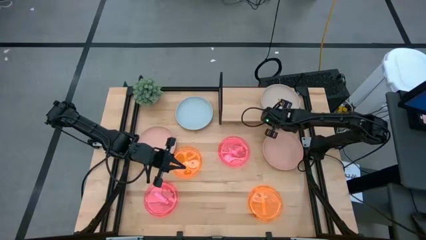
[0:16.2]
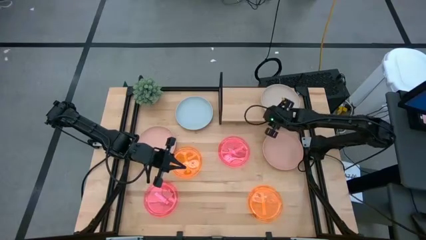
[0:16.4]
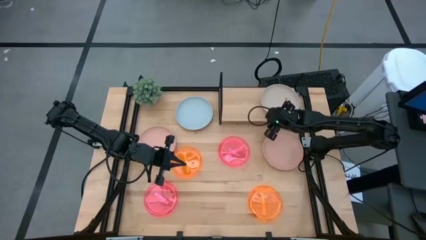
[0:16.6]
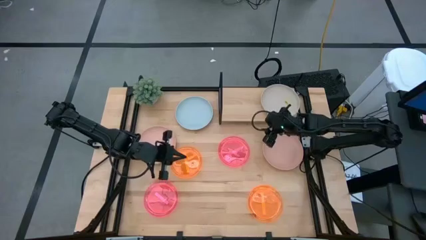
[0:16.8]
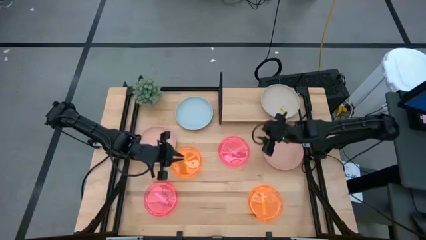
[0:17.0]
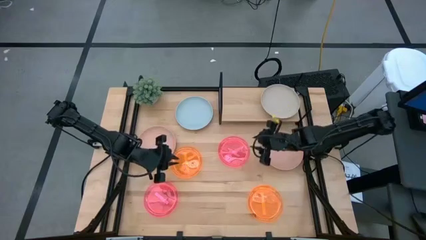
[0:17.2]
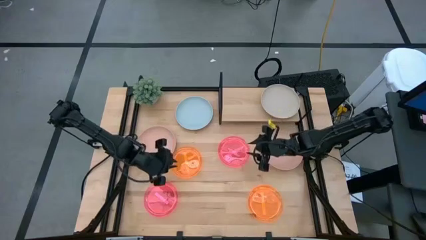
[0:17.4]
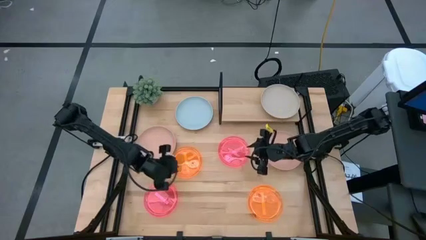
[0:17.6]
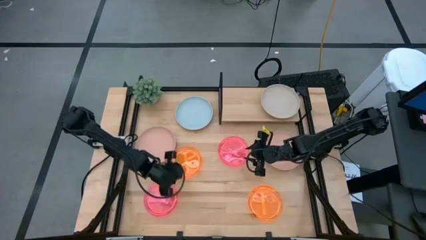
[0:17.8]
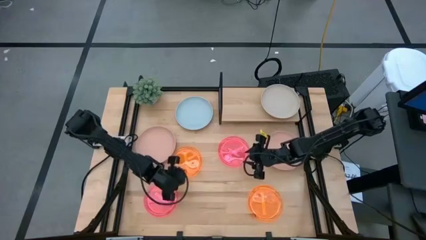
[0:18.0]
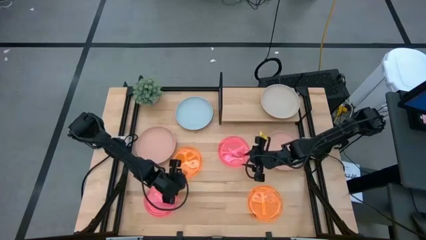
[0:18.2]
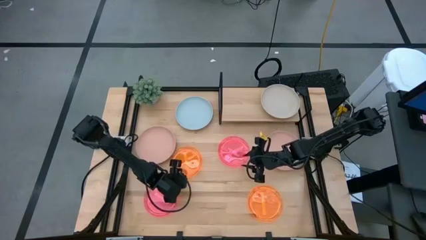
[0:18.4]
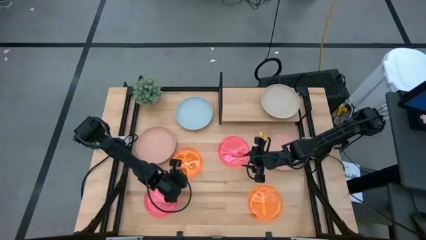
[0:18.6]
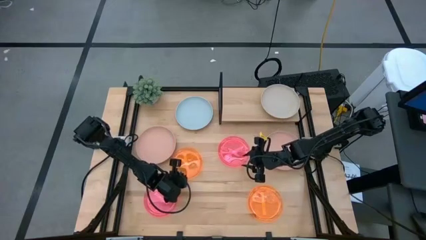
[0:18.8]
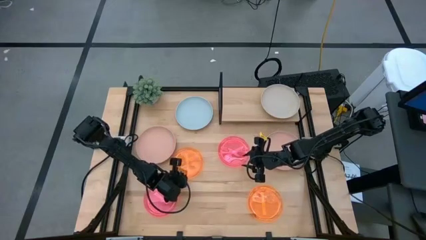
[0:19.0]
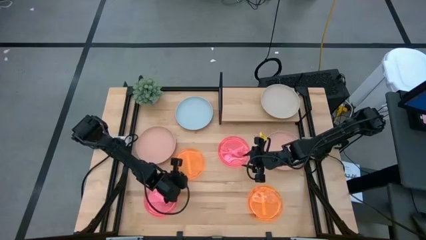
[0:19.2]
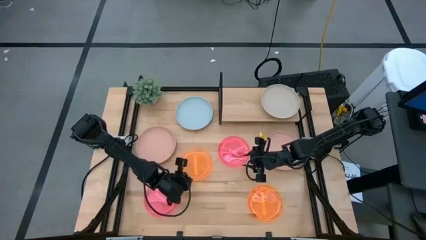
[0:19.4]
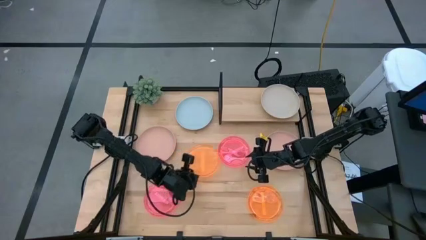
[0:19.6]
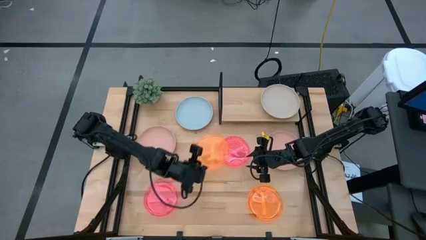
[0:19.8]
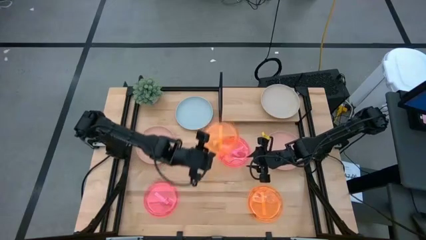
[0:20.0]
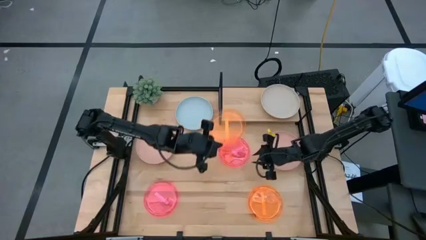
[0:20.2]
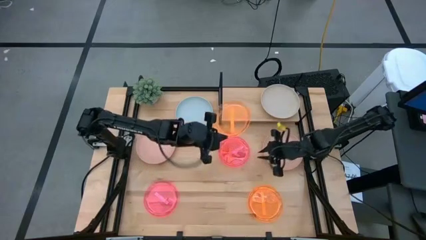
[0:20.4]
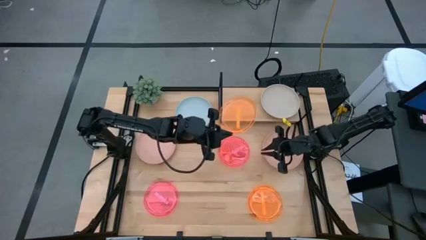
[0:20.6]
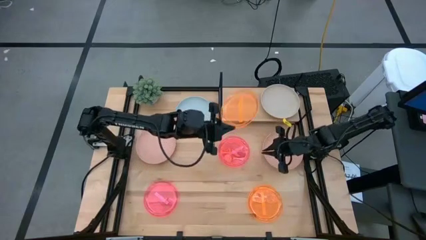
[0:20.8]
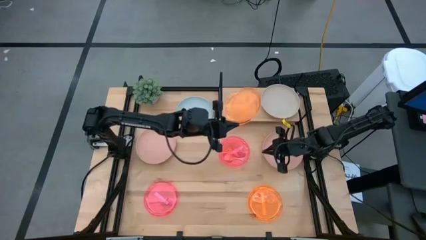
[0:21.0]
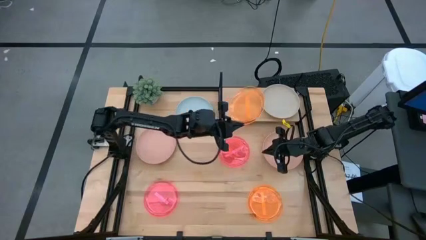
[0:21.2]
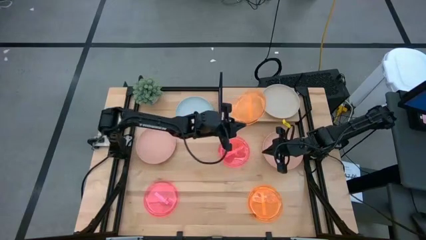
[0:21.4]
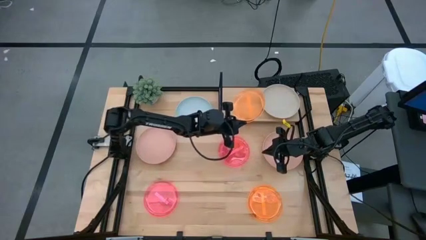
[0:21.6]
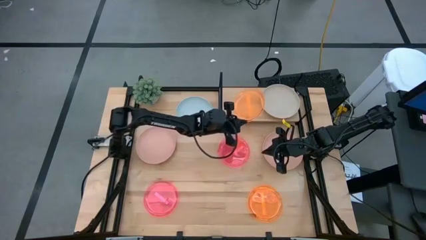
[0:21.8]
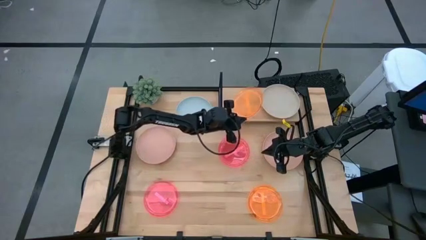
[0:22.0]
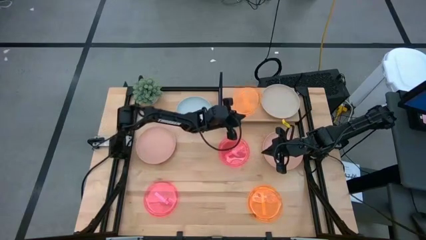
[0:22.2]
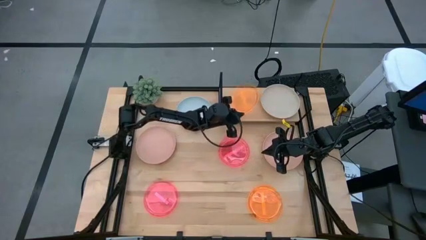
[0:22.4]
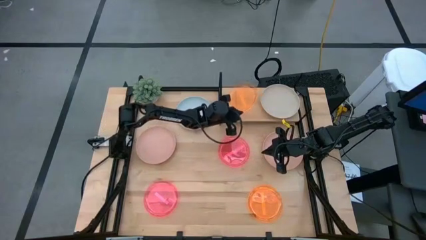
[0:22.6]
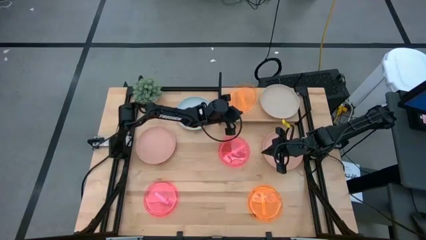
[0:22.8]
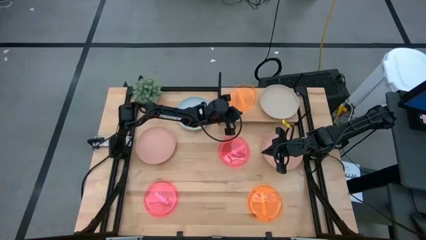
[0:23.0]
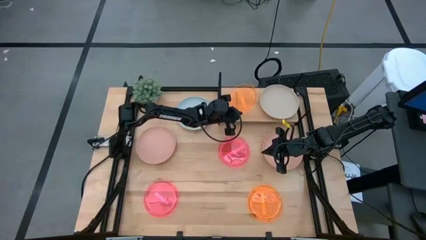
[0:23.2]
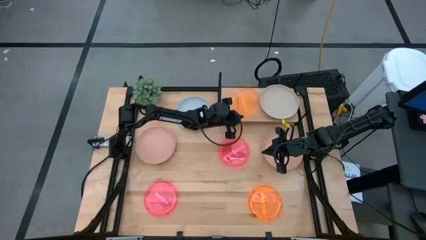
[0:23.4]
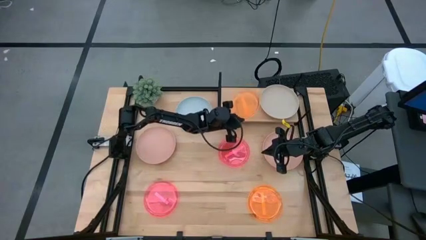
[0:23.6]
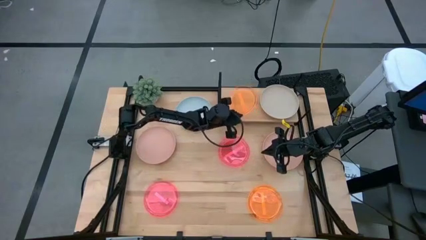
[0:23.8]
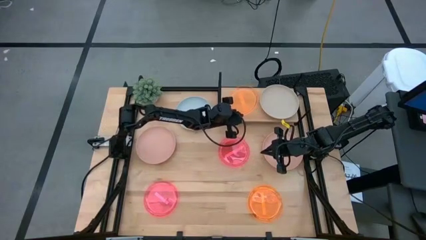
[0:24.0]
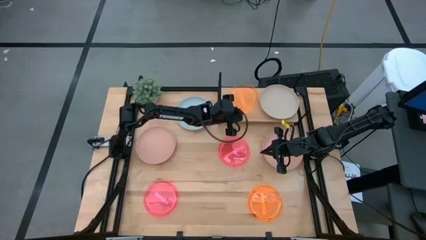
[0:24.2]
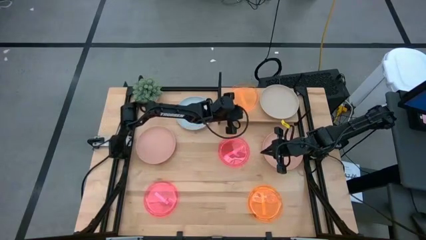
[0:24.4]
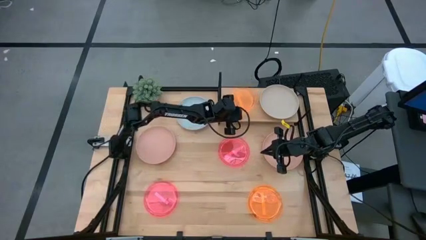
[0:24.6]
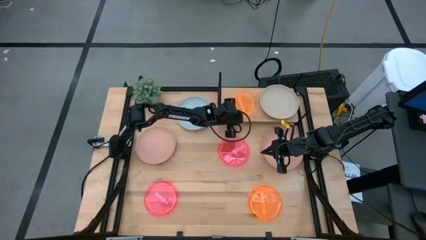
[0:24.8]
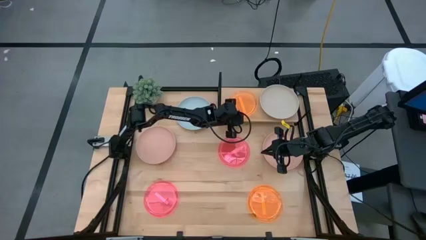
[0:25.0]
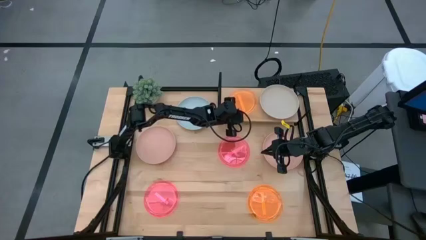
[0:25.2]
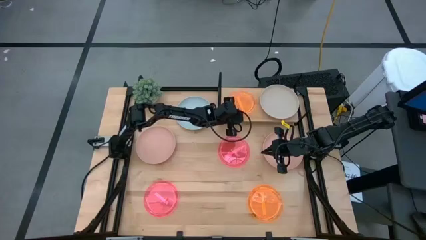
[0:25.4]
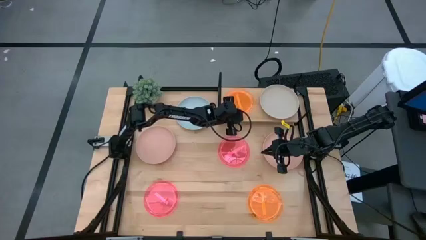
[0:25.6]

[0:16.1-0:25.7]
Task: Place and stack plates onto a shelf
Put the top orange plate on the shelf

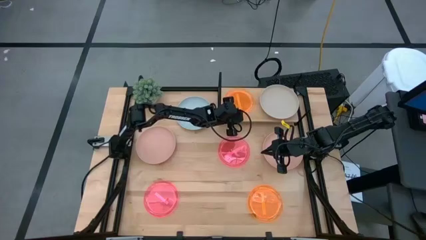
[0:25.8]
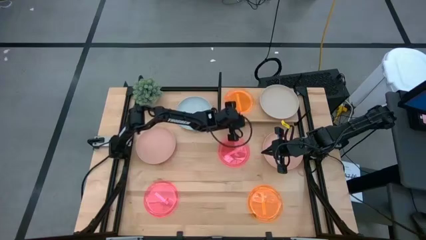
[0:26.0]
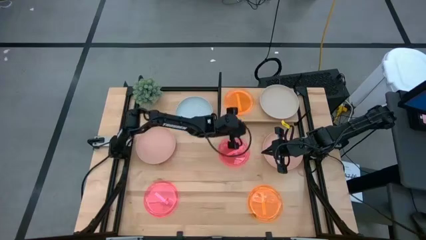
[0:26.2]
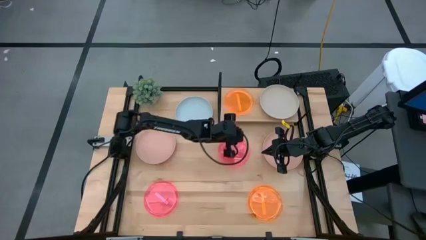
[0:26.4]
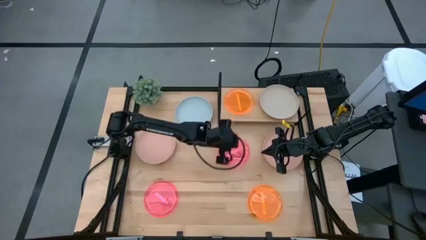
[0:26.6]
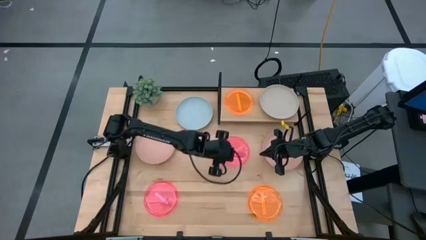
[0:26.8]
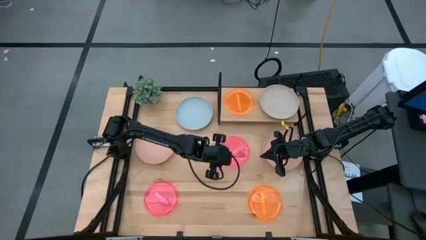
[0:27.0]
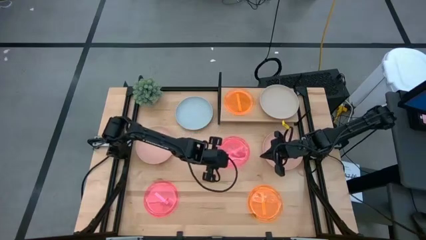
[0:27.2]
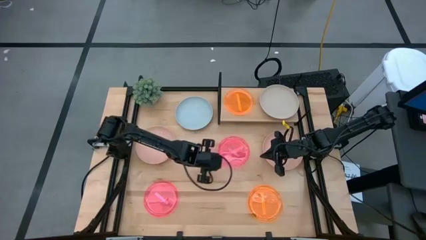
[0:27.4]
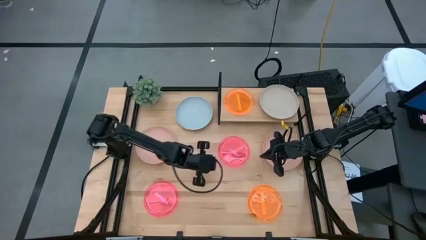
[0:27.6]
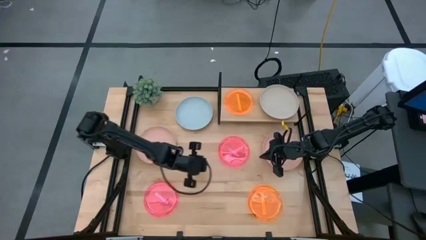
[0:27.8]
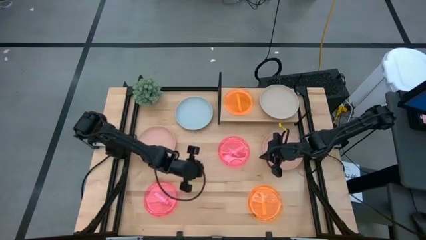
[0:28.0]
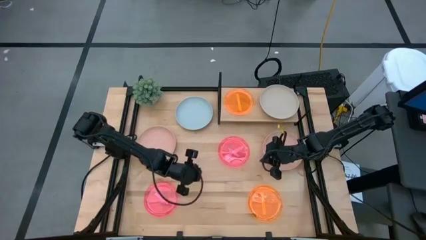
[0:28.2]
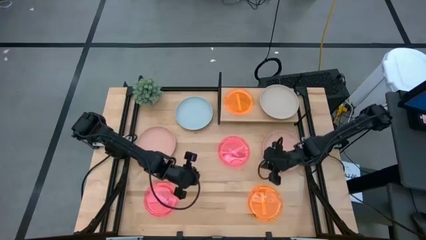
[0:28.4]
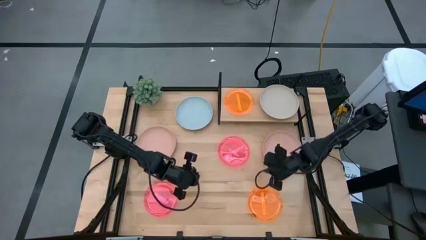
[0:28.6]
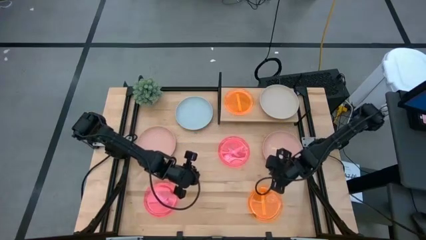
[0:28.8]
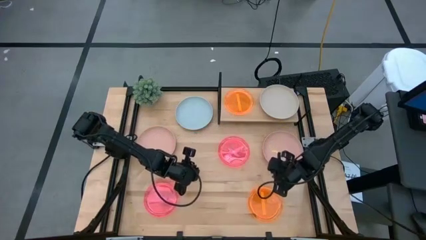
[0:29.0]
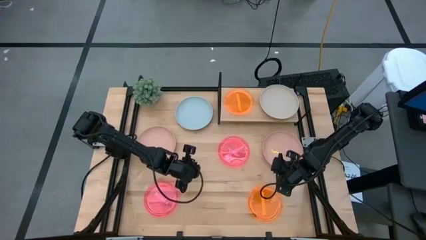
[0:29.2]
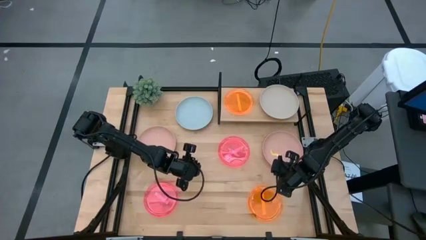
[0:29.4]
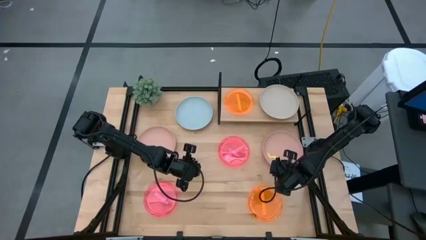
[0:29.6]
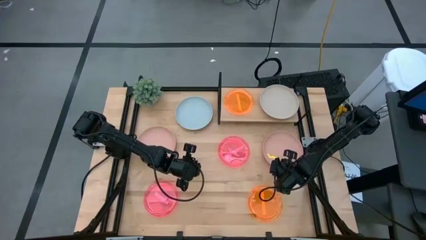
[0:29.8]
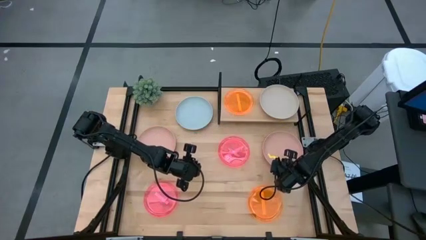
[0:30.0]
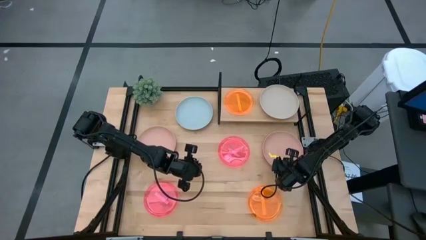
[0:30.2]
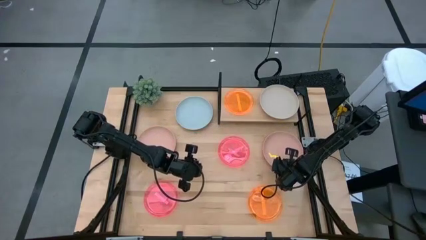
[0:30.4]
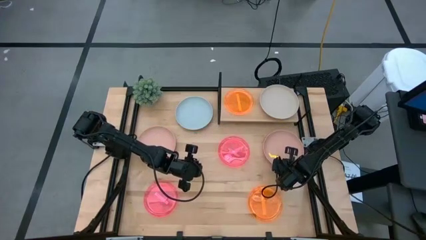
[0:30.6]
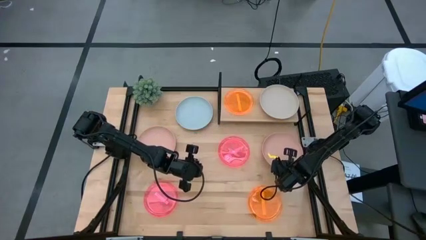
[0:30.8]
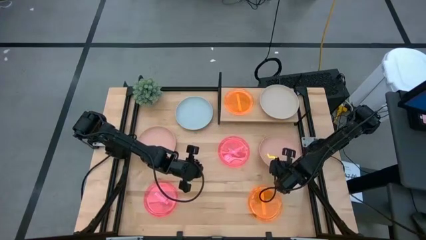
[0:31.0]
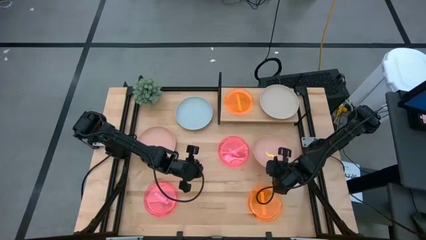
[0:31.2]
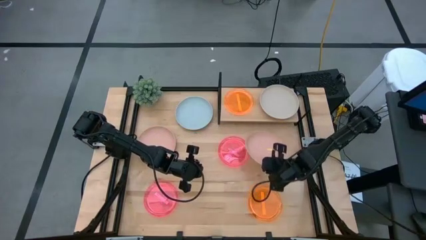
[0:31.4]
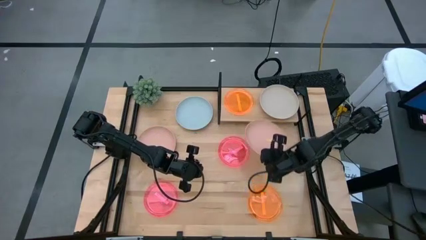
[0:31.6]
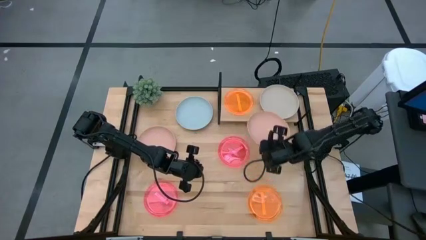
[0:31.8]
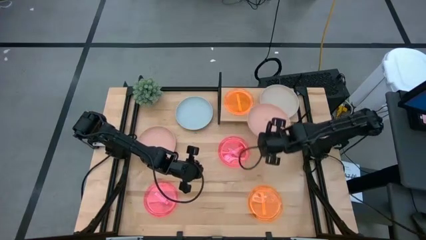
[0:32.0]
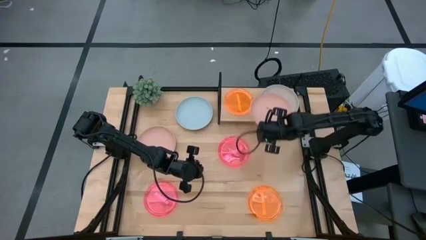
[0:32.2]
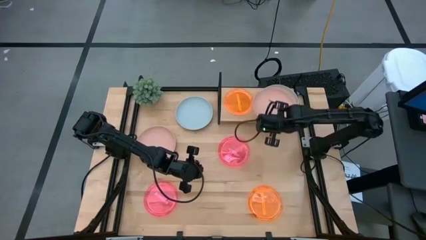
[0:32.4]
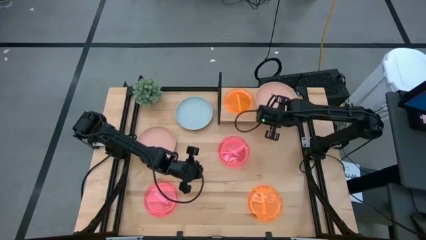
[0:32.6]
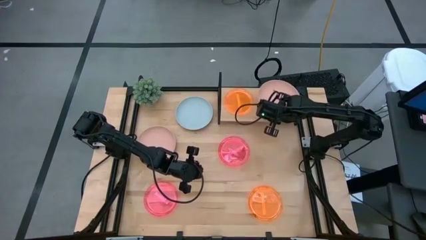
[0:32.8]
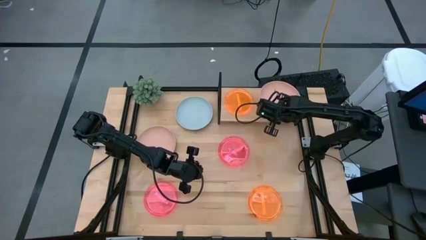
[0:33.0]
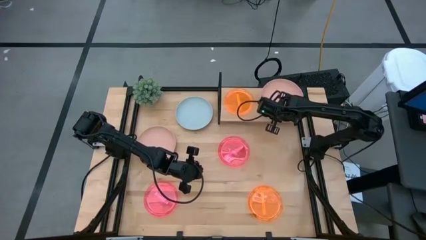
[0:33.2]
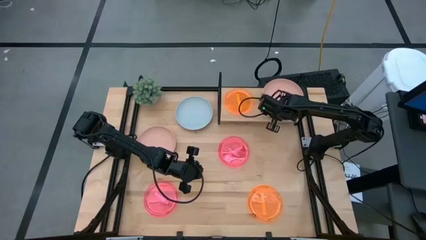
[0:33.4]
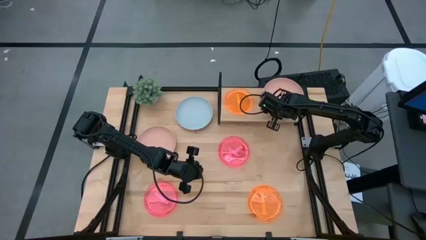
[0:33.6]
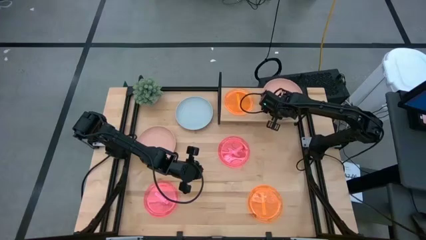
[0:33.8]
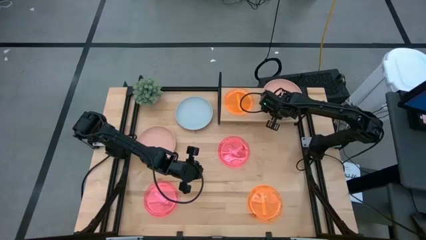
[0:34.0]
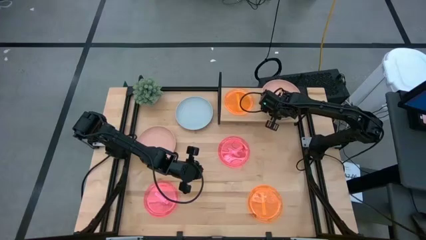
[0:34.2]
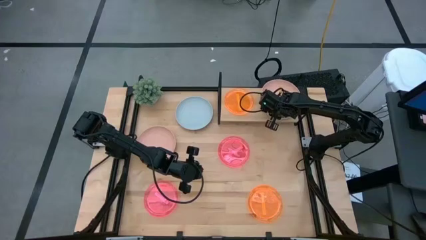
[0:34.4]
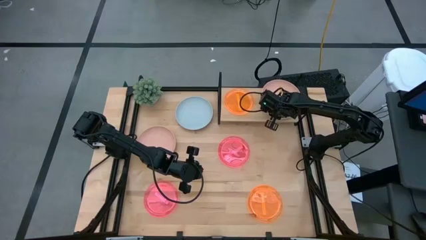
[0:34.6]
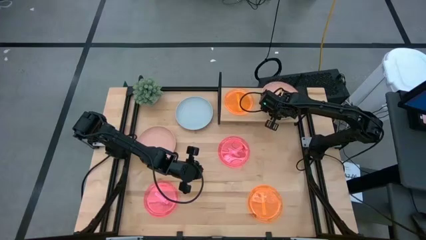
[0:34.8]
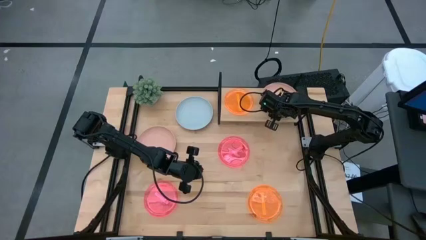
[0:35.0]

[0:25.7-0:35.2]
Stack the right light pink plate on top of the gray plate on the shelf
